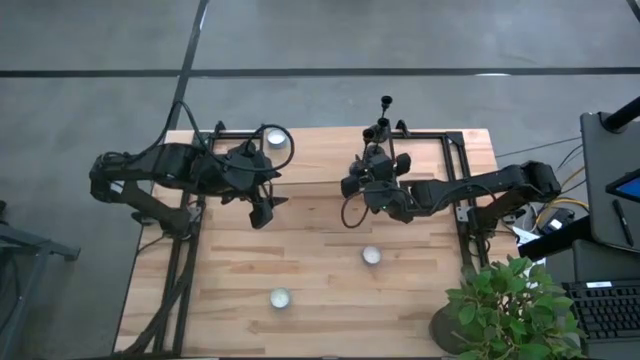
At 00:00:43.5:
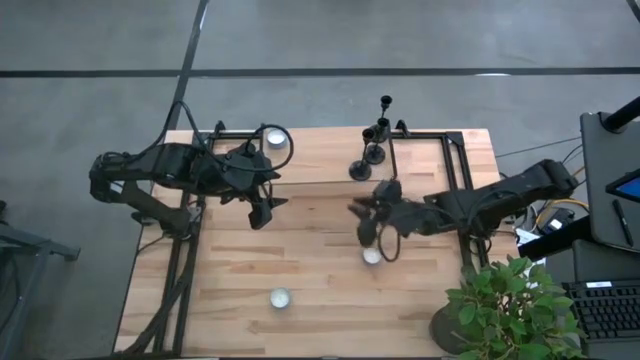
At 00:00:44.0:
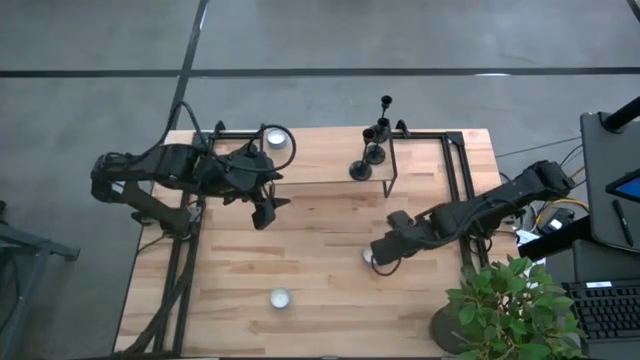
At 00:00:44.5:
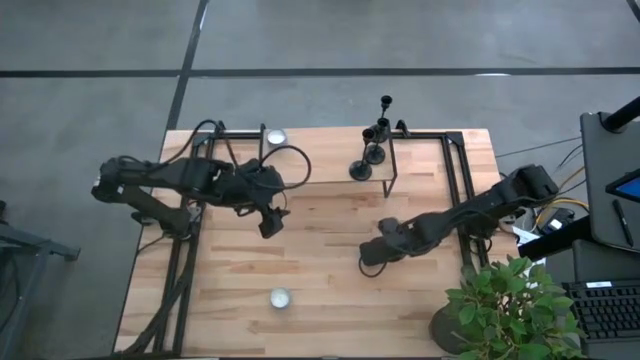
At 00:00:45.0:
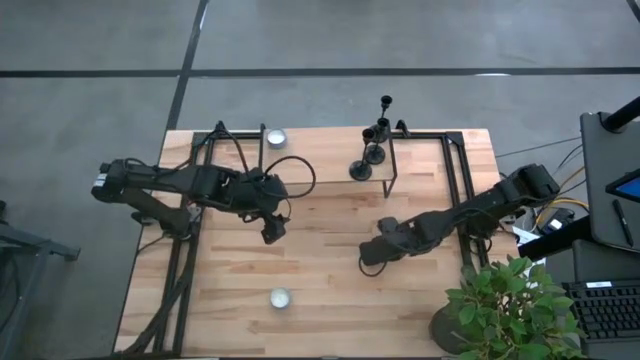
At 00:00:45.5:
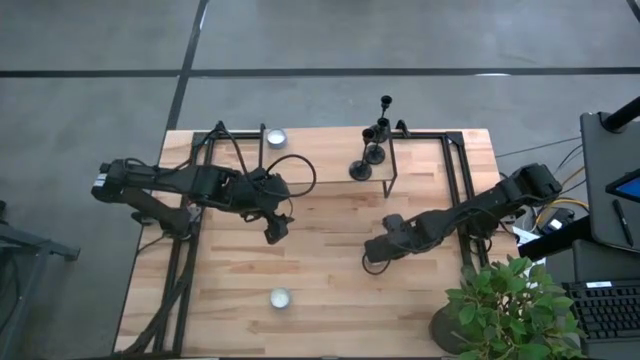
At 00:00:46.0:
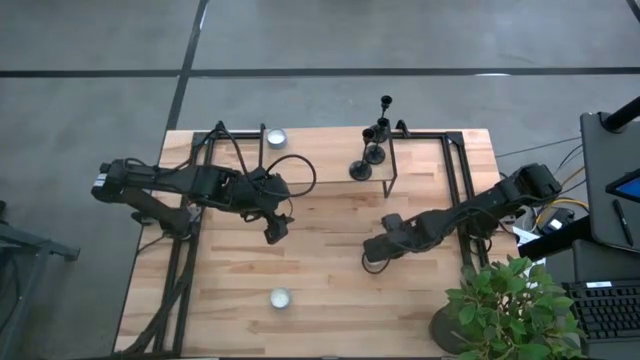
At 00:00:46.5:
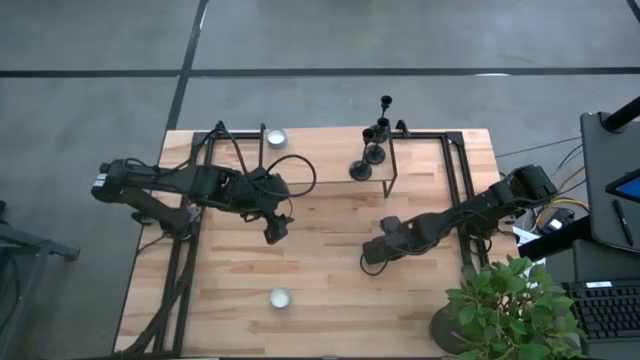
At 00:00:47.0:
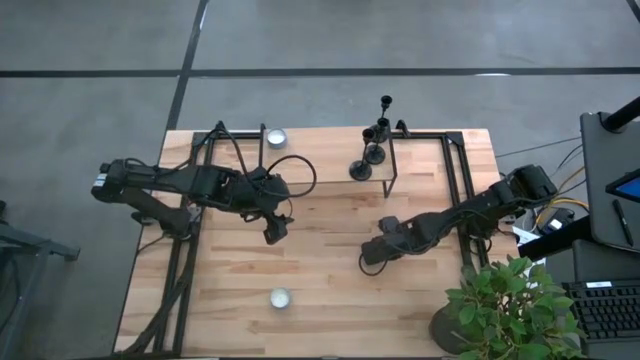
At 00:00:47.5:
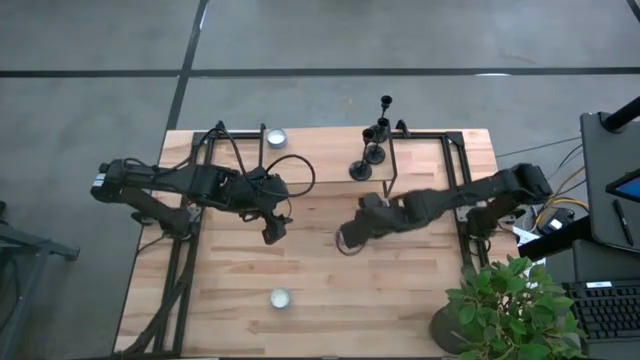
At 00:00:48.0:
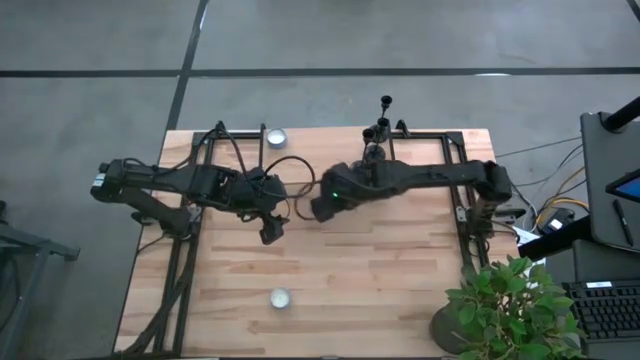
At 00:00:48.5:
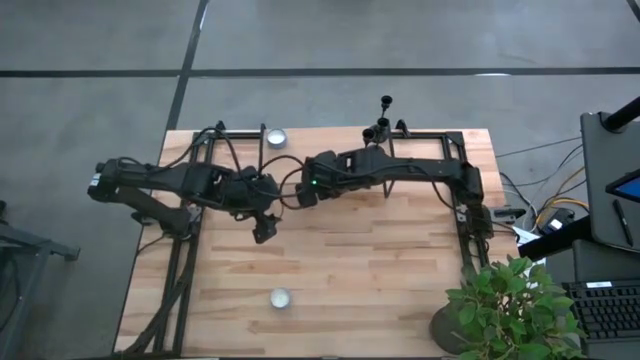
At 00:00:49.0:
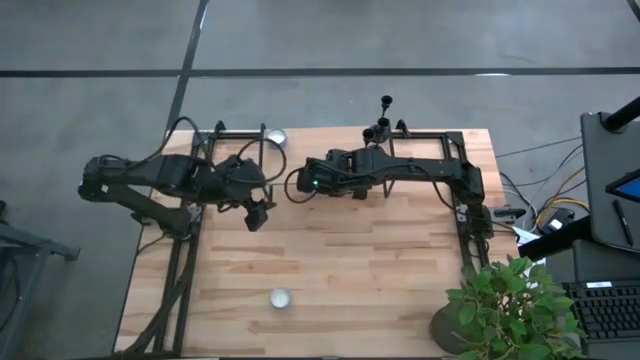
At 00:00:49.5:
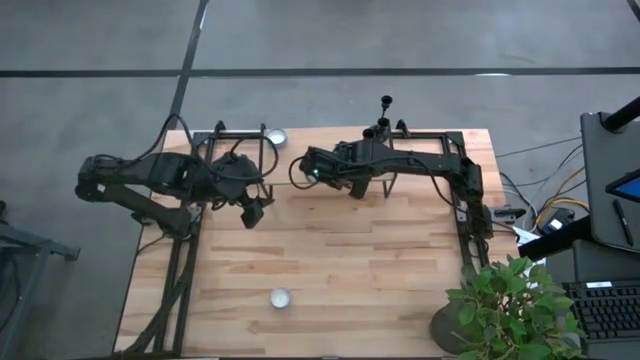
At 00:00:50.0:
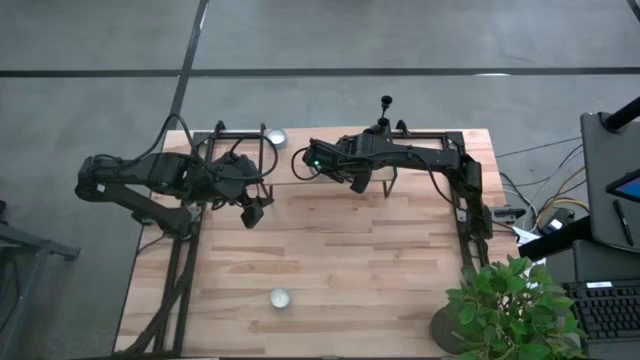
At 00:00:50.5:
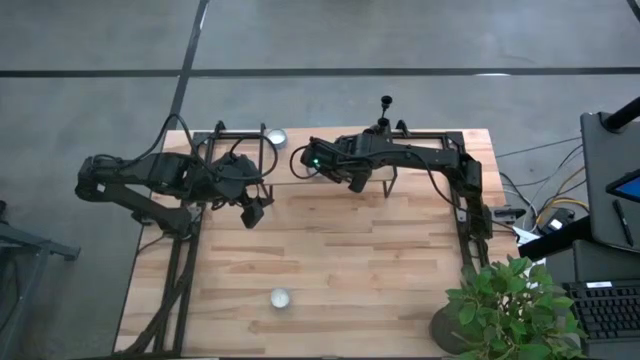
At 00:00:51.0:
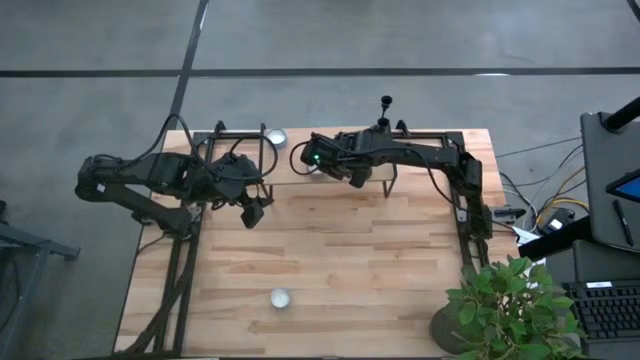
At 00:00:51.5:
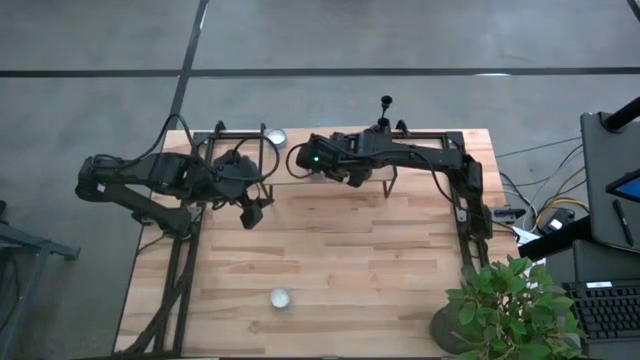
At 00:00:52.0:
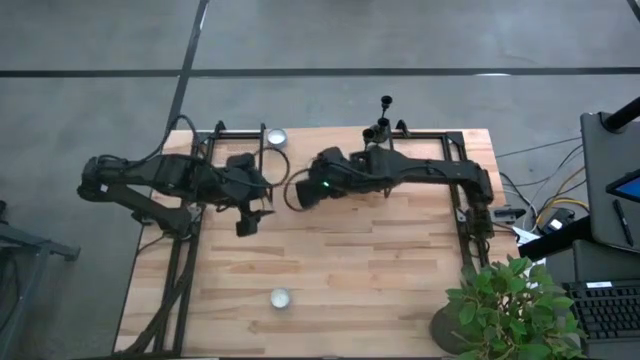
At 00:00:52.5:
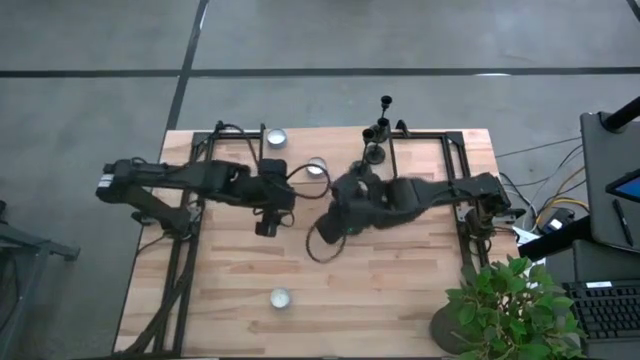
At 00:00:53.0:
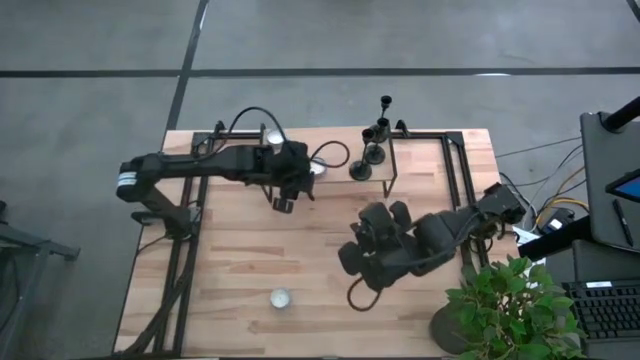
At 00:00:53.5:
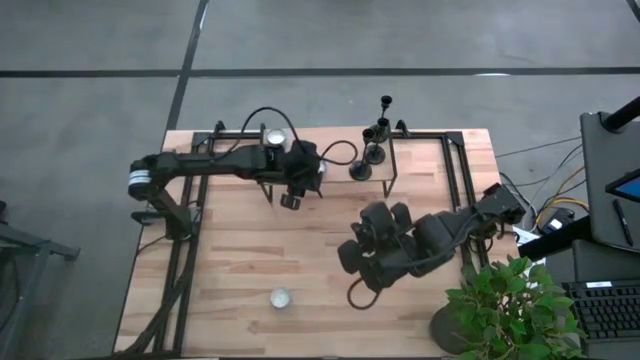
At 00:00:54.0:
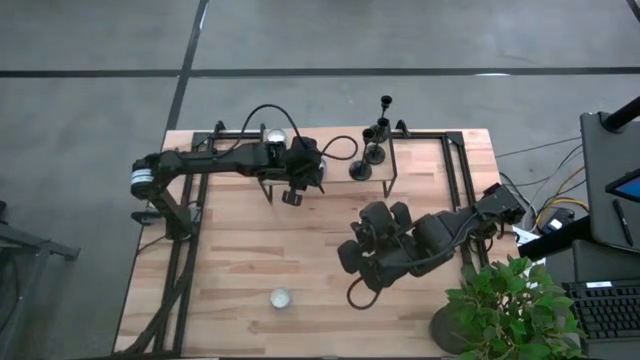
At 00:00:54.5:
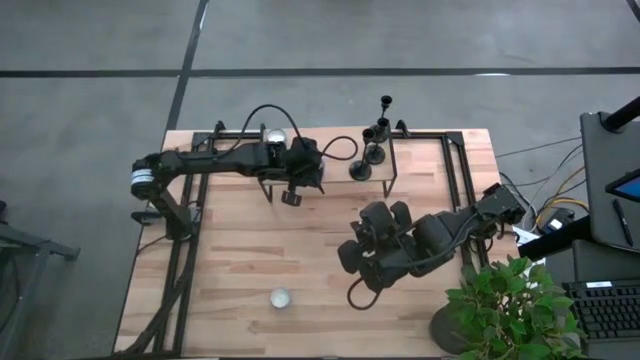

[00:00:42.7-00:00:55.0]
Task: Pick & Place candle stick holders
Put the purple scented candle on the shelf aligned with the other scented candle

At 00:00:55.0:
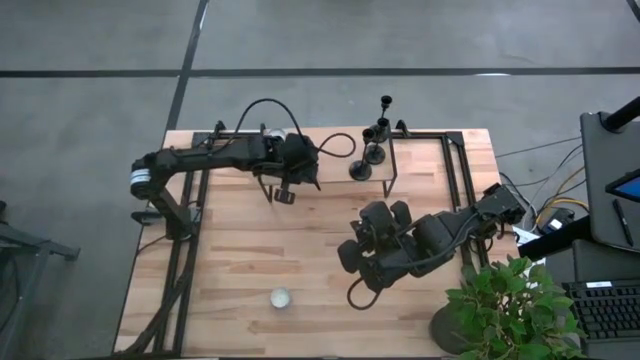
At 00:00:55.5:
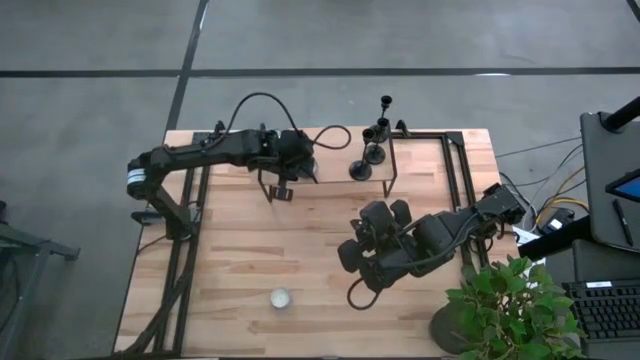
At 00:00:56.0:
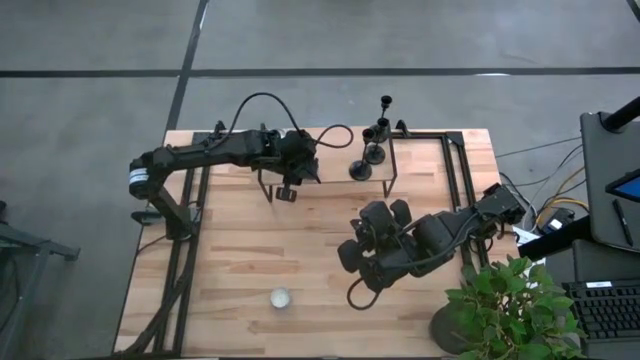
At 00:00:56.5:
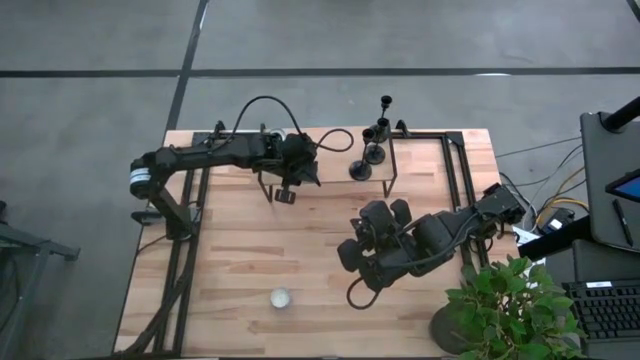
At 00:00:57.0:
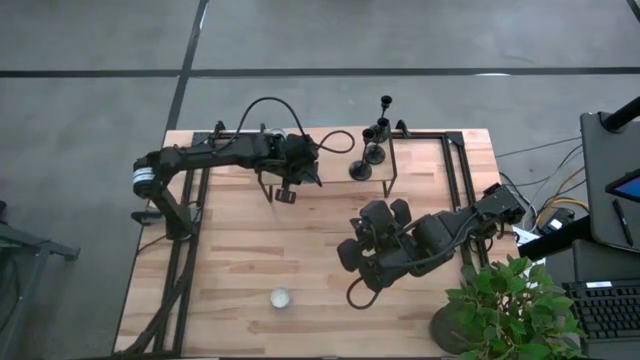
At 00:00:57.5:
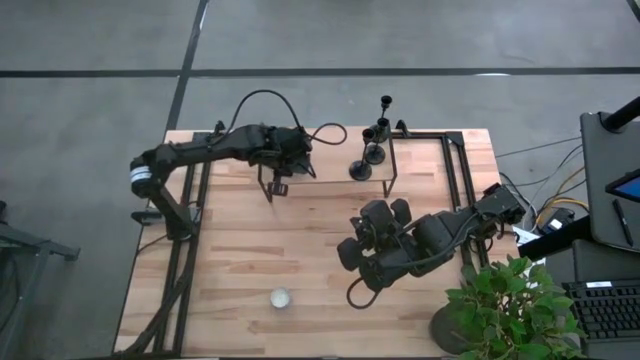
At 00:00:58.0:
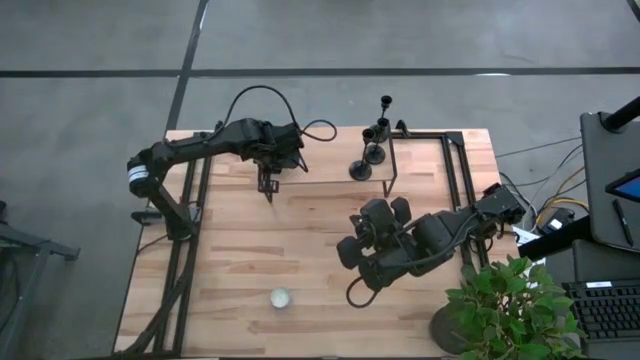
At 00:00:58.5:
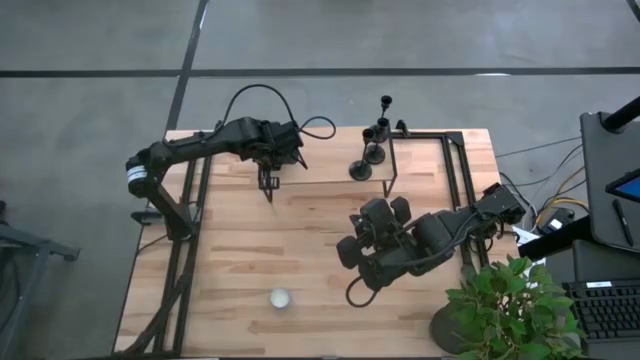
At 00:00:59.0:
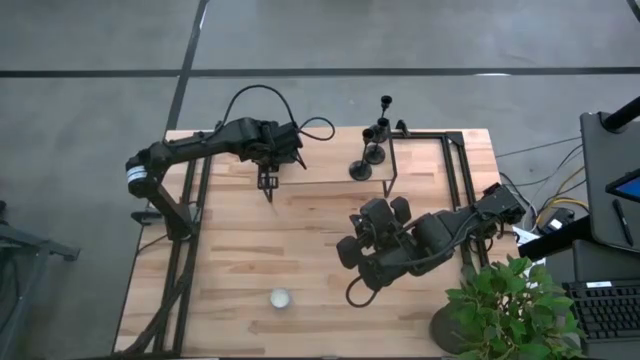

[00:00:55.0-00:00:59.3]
Put the purple scented candle on the shelf aligned with the other scented candle

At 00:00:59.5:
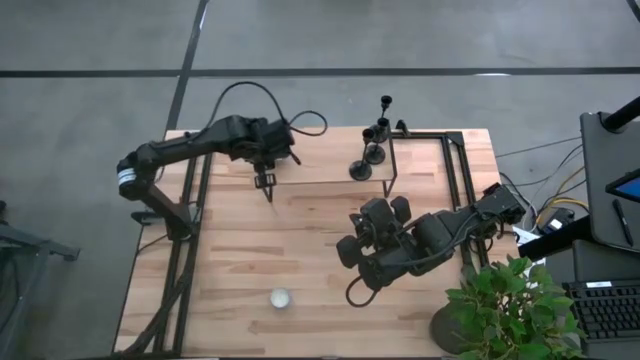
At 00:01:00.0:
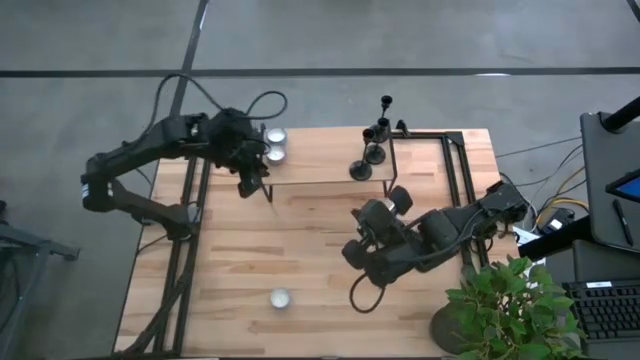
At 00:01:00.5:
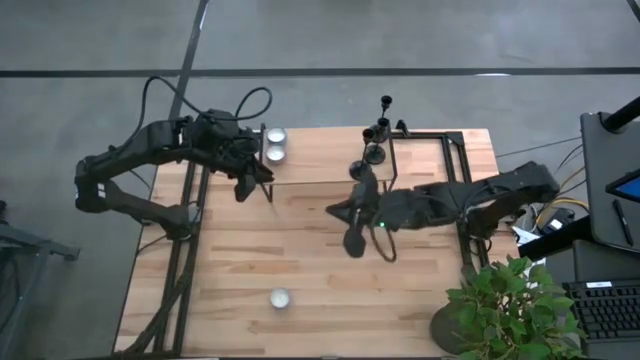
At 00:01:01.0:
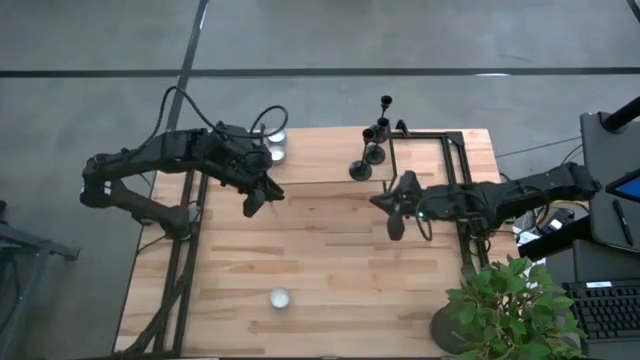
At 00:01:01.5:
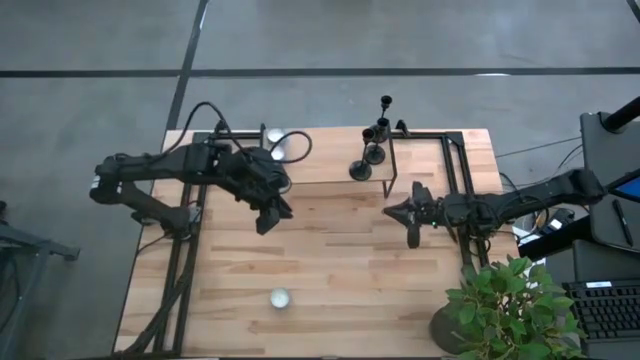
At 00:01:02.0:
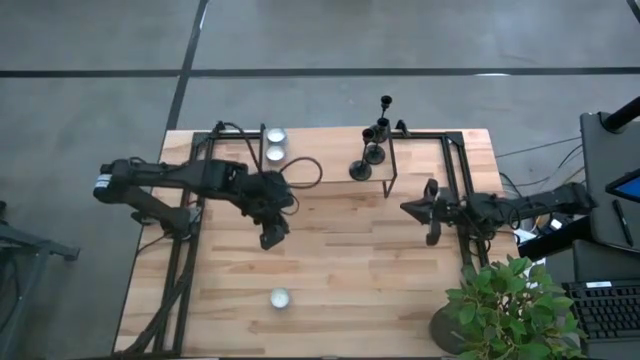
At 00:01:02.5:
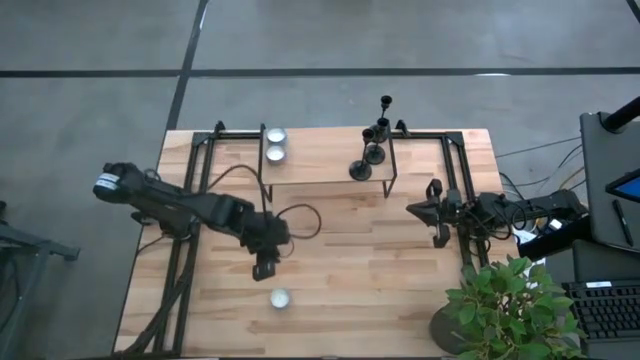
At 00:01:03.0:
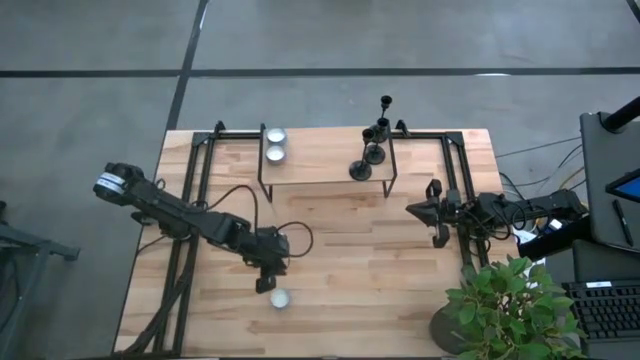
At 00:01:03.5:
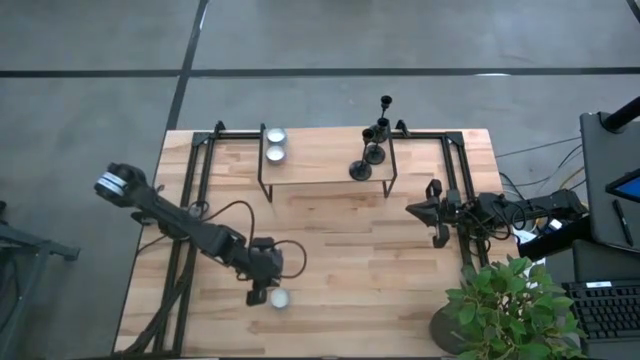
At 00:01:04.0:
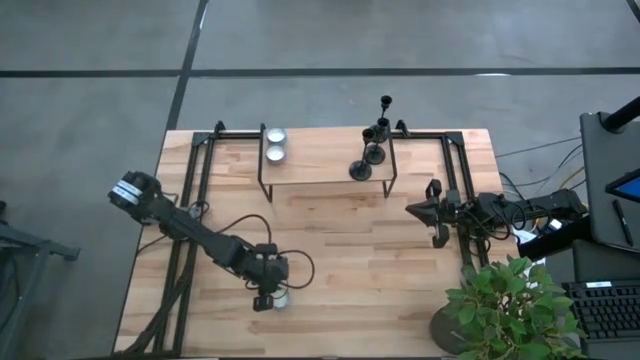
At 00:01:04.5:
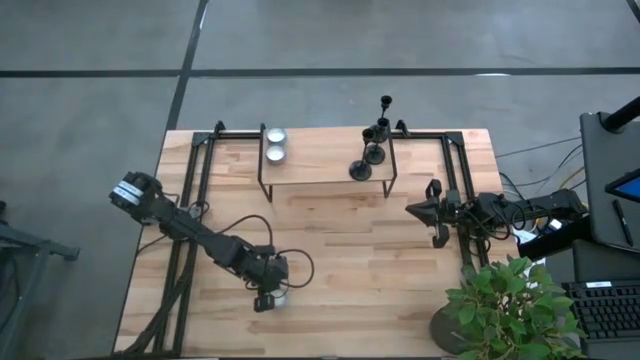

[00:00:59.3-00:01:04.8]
Put the red scented candle on the shelf aligned with the other scented candles
